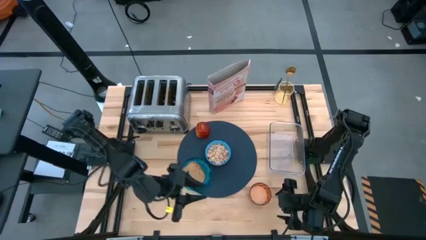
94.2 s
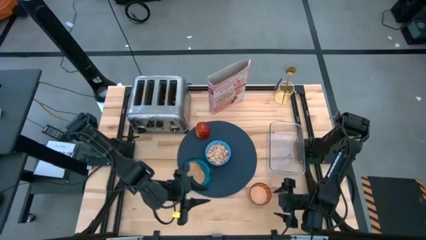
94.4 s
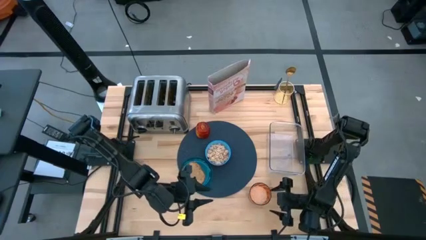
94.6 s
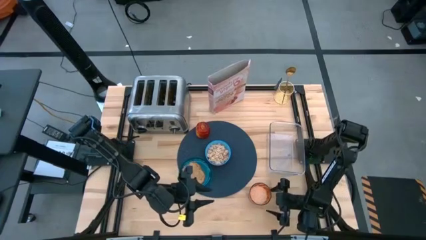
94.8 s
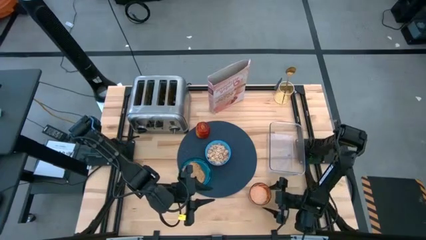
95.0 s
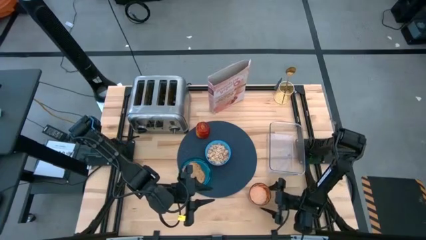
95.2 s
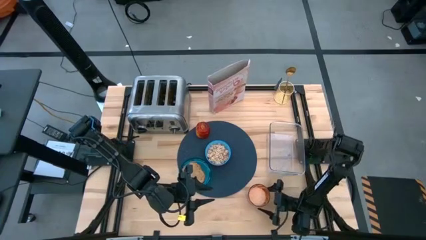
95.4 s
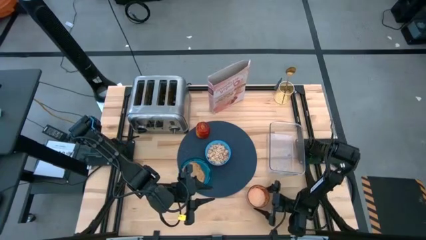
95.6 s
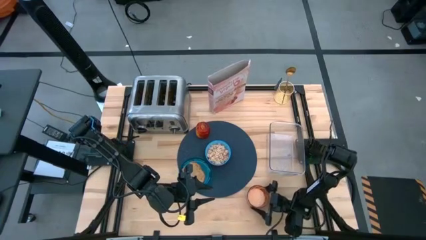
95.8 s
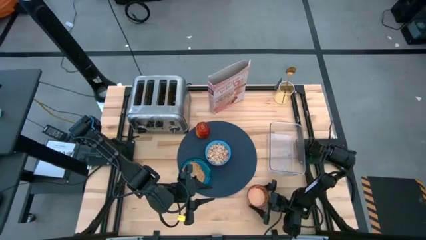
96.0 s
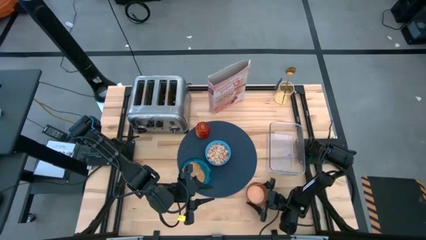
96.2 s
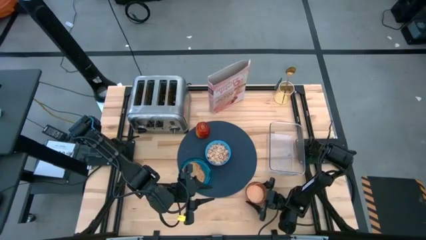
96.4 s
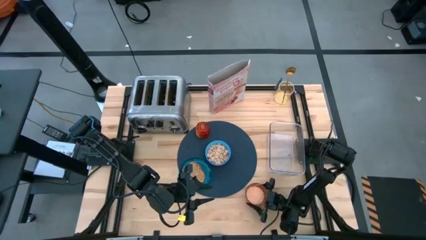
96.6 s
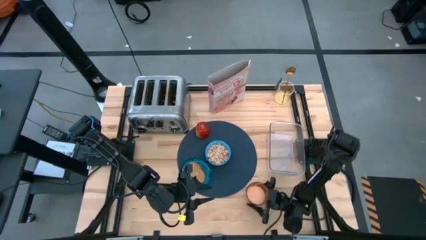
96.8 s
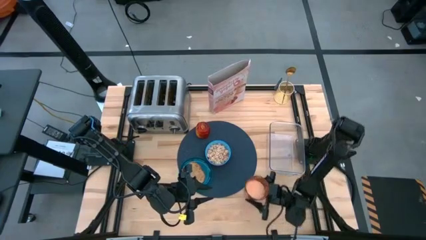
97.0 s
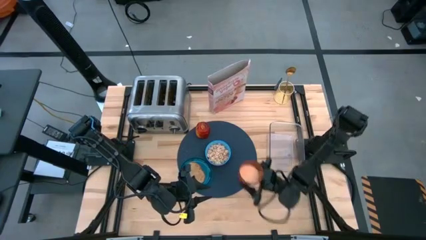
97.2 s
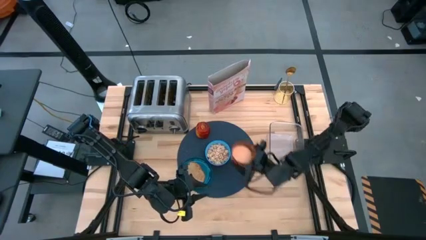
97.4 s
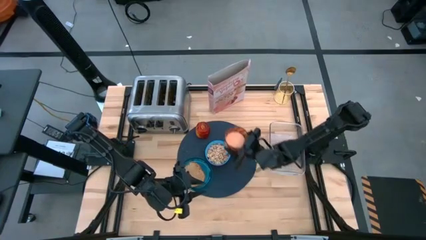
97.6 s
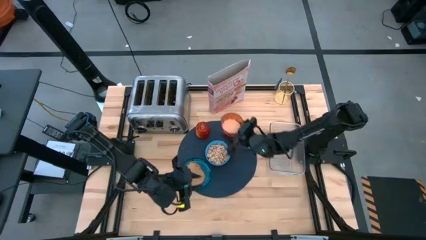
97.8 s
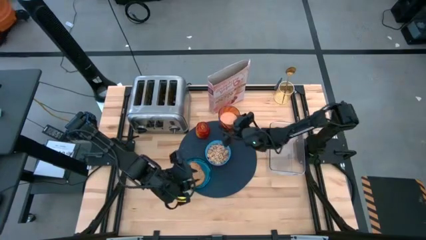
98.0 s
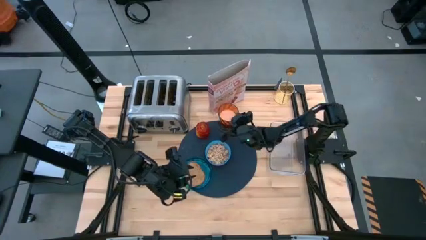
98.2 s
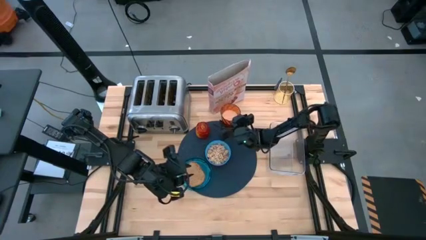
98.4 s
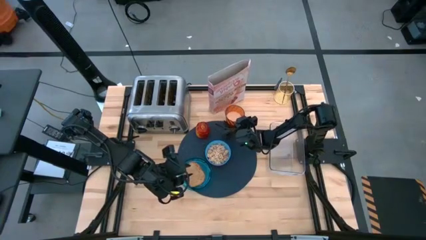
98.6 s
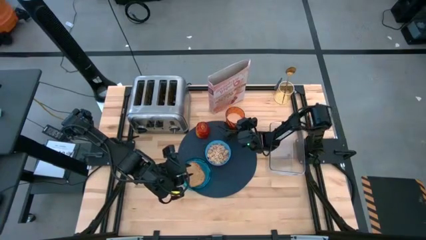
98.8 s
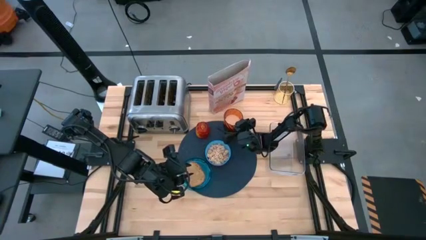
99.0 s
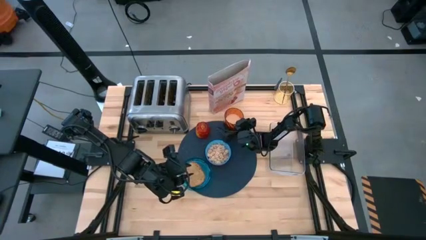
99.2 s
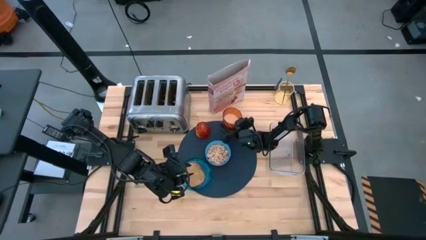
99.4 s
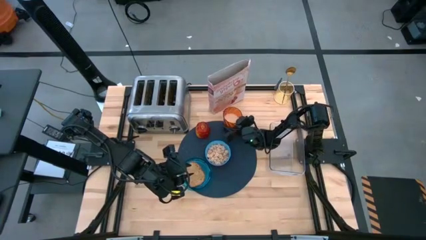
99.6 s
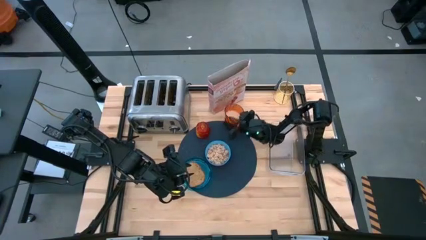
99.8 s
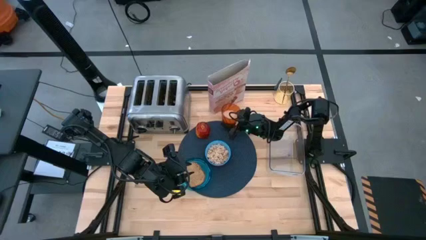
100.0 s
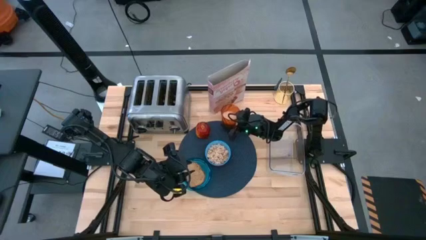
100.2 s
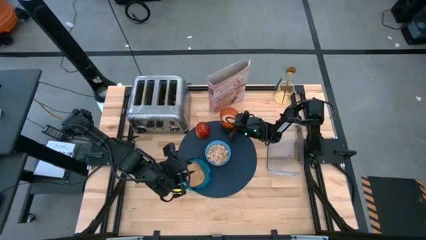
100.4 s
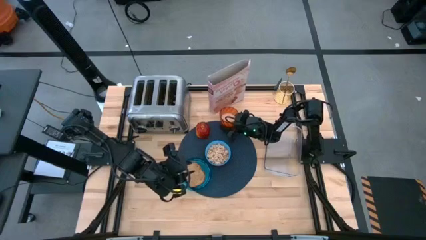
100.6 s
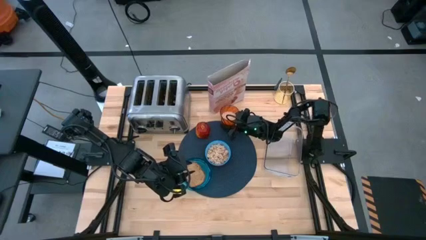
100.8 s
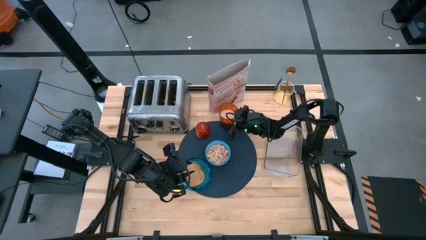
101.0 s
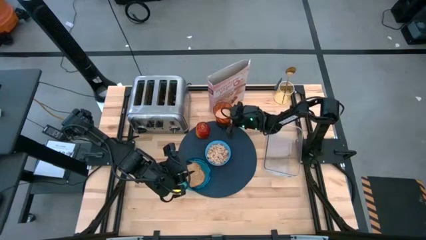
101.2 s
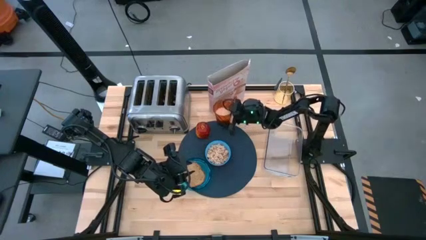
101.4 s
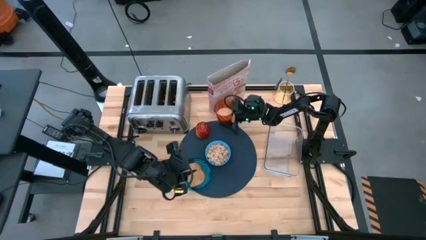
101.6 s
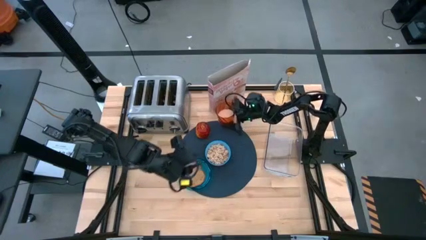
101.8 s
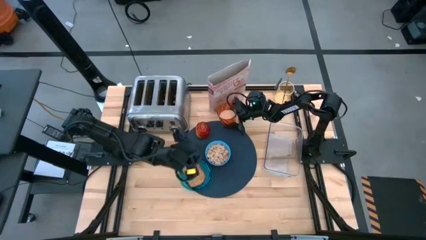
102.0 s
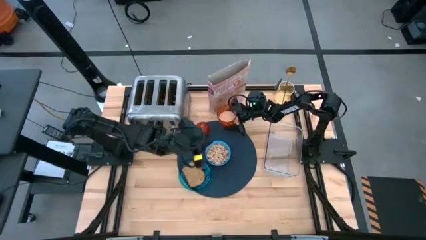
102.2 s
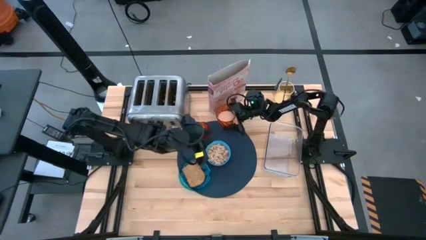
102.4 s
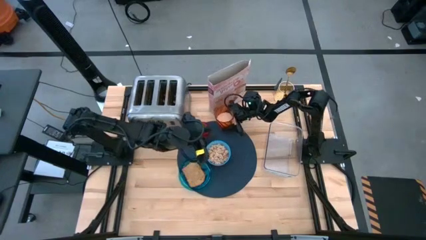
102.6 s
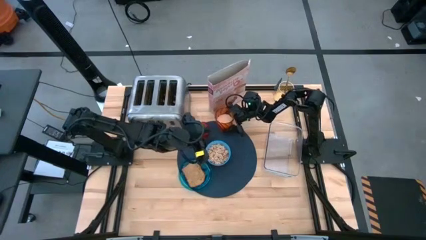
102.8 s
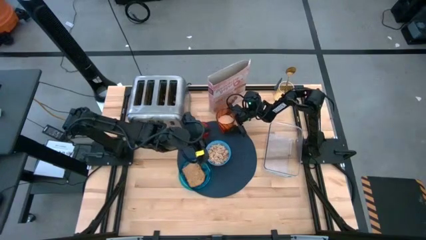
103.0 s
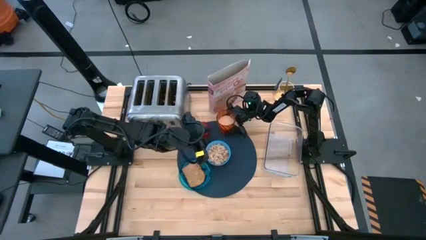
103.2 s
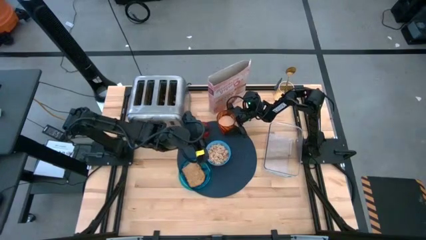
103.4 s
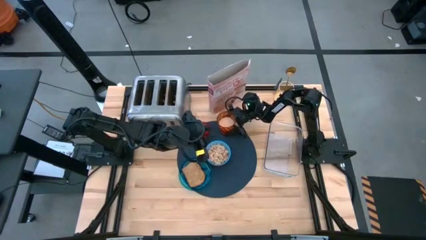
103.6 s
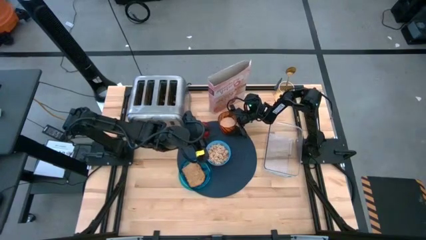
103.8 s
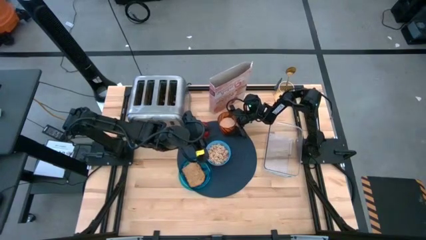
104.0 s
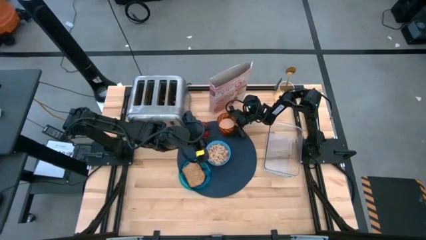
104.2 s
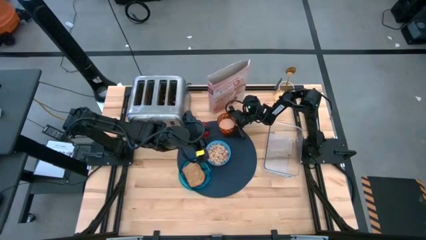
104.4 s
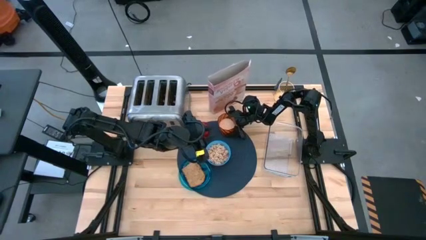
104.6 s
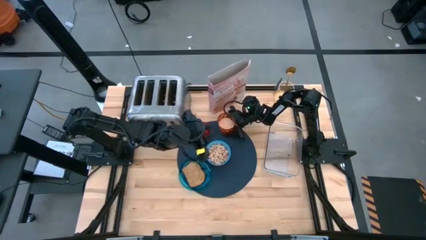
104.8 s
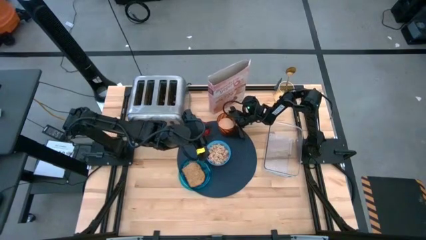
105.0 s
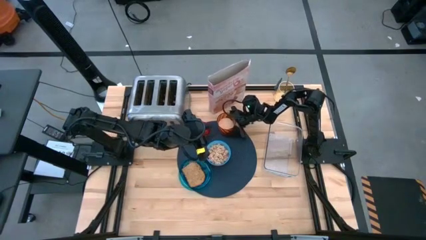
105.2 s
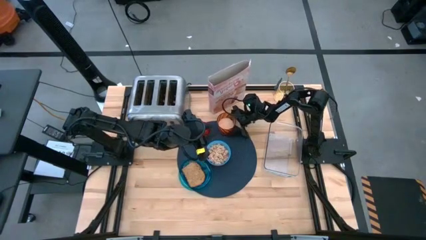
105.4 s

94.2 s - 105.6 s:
Task: Arrange a breakfast setting
Put the orange cup on the blue table table mat to the right of the red apple

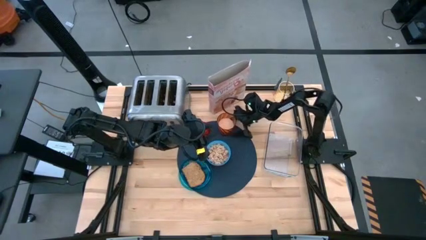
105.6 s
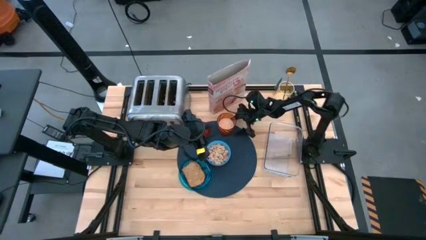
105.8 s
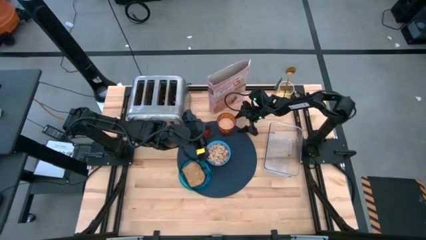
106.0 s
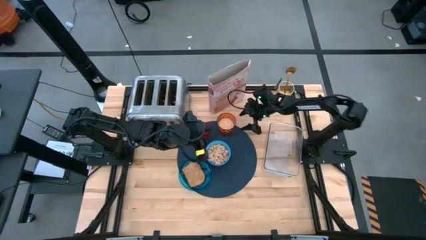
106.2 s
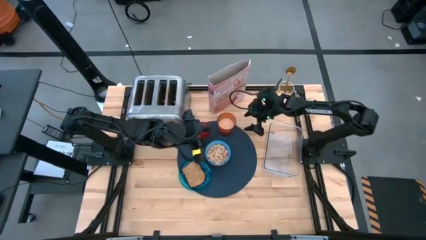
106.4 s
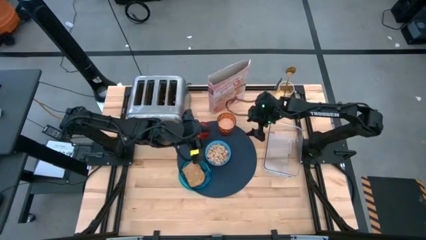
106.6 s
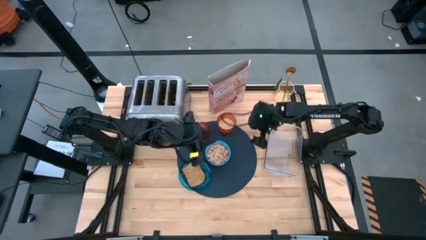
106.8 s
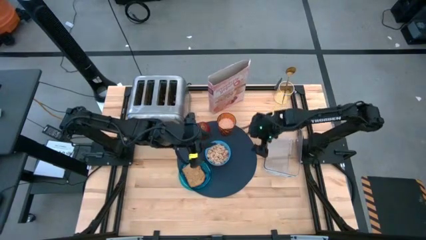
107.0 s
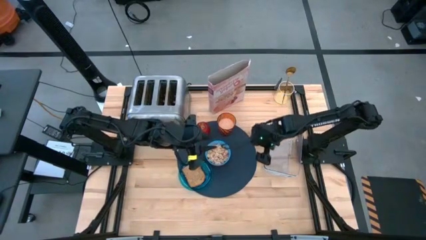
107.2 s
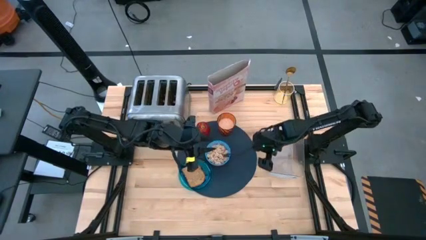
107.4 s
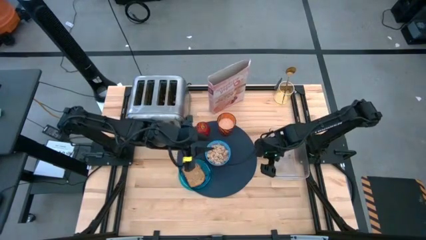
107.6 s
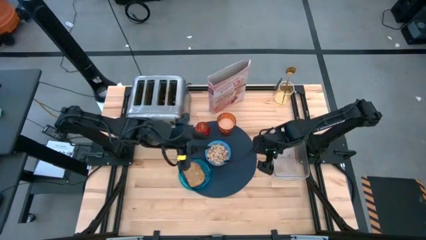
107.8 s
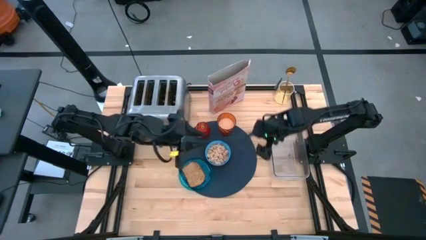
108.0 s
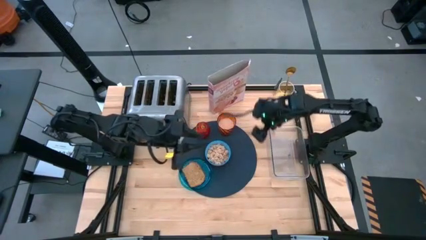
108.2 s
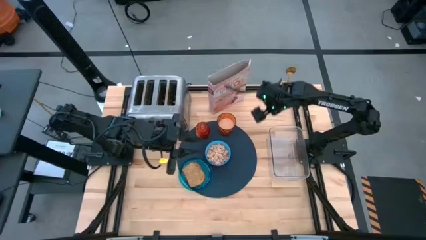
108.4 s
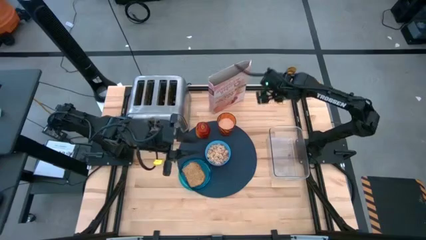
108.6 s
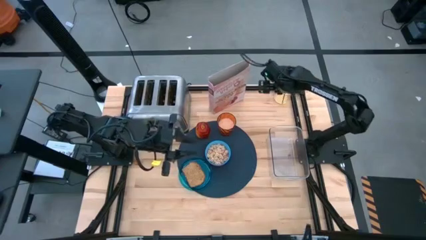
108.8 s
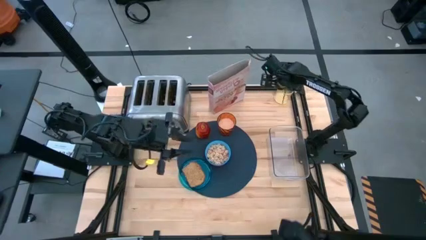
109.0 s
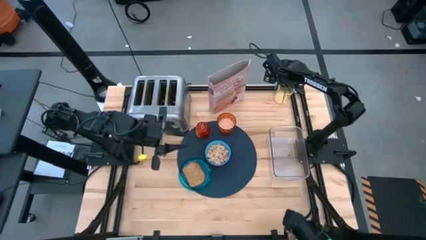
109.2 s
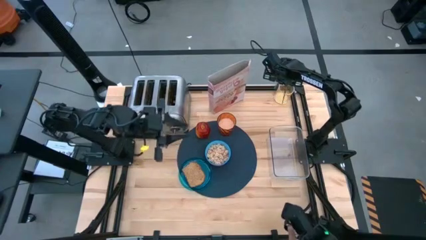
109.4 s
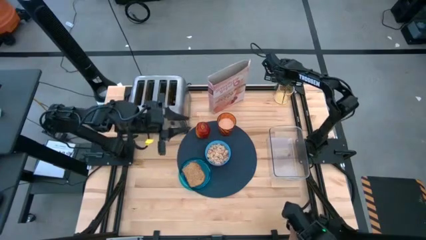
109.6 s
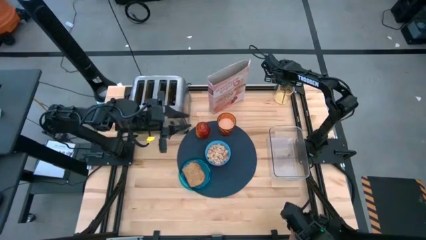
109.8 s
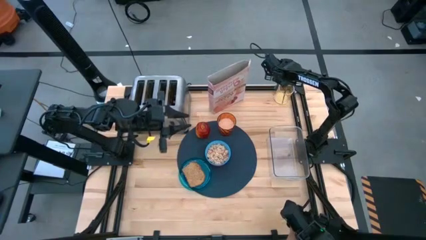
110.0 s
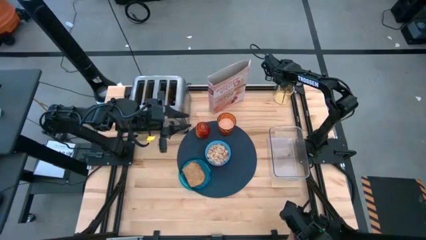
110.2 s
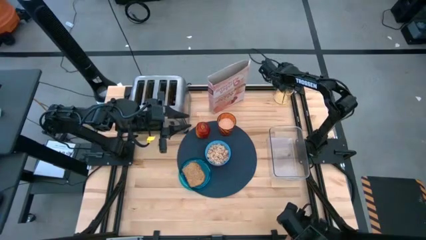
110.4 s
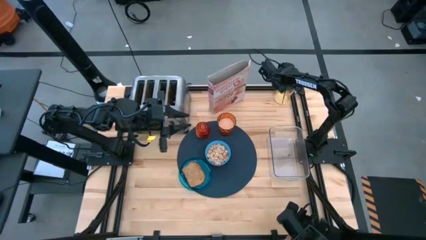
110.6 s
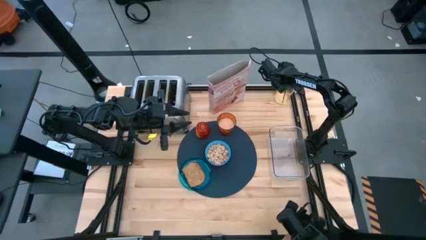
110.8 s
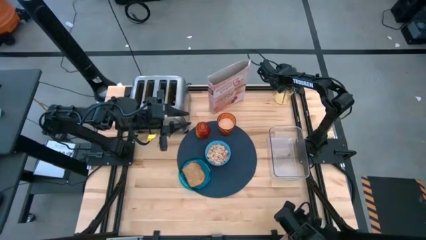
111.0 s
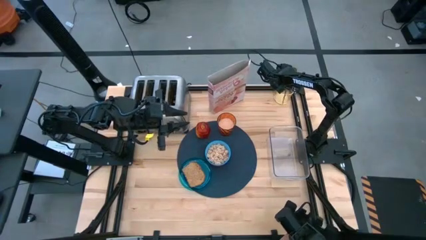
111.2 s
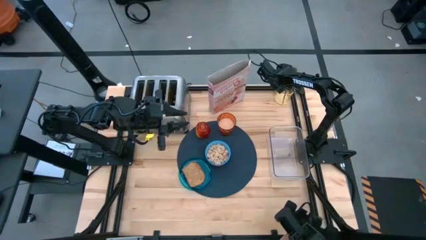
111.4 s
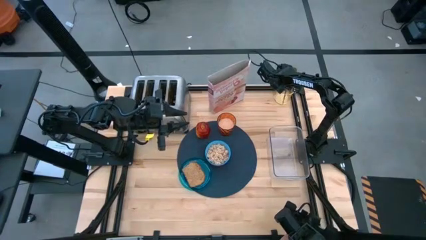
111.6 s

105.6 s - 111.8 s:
Put the gold spoon on the blue table mat to the right of the blue bowl
